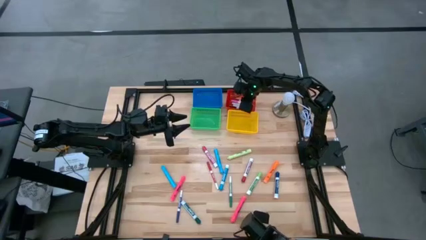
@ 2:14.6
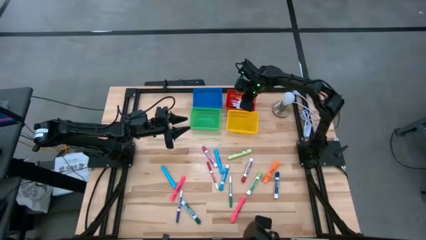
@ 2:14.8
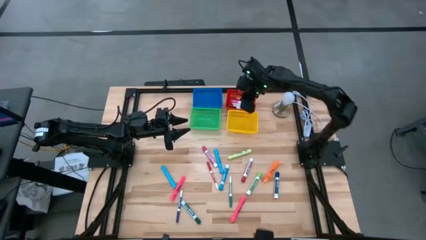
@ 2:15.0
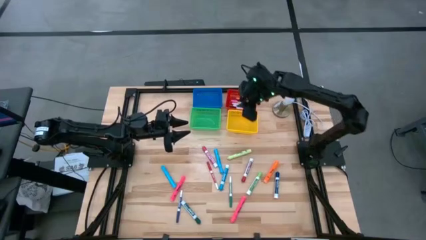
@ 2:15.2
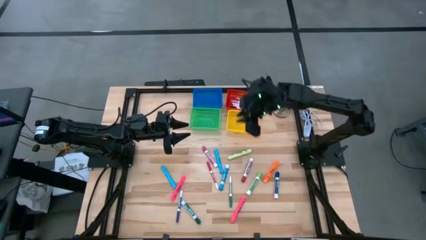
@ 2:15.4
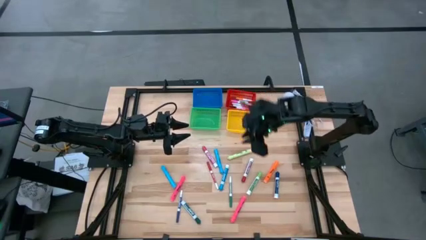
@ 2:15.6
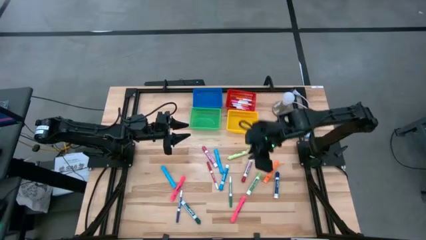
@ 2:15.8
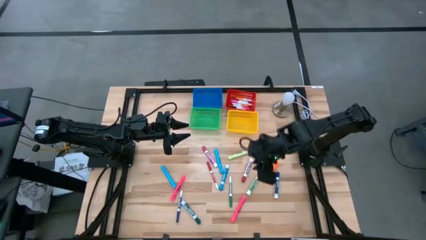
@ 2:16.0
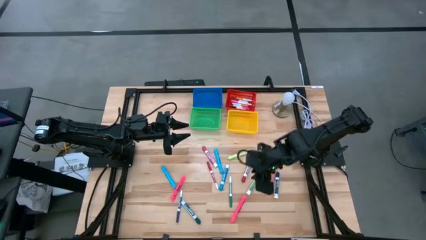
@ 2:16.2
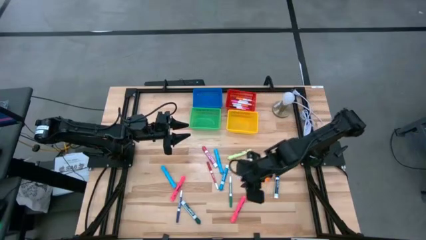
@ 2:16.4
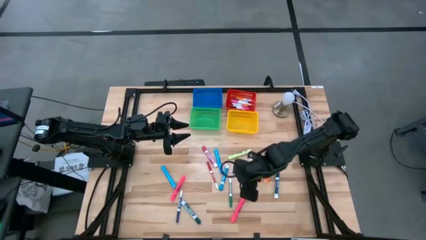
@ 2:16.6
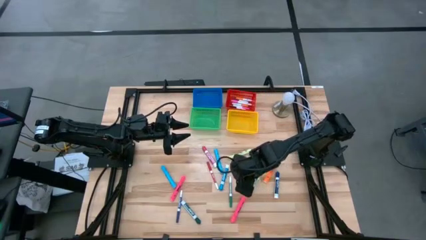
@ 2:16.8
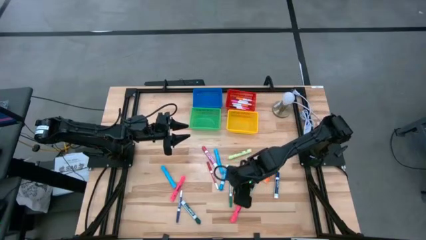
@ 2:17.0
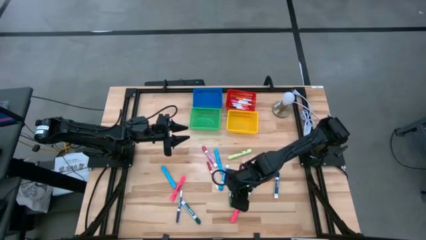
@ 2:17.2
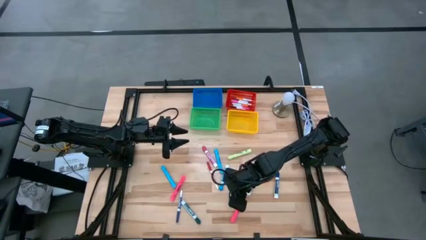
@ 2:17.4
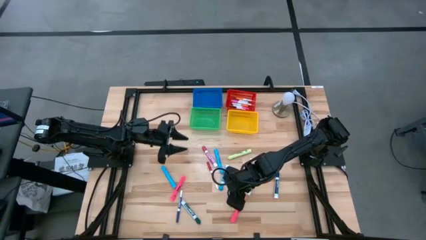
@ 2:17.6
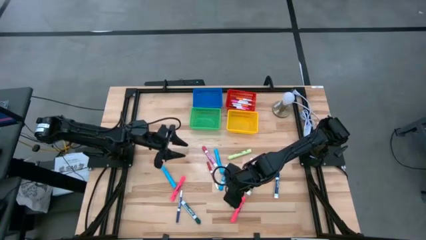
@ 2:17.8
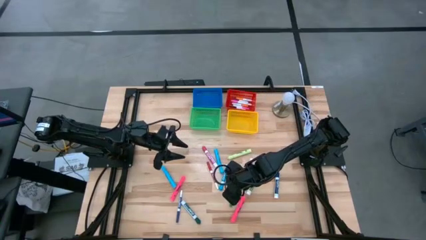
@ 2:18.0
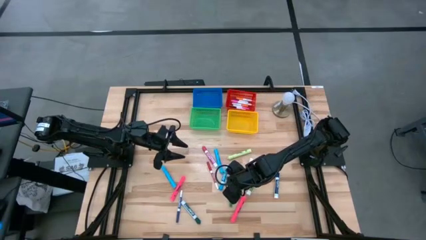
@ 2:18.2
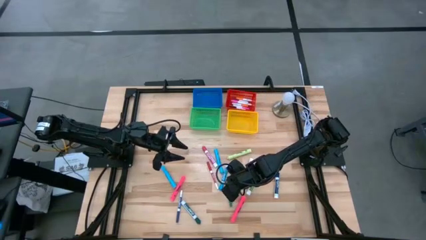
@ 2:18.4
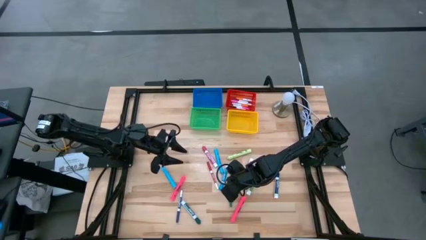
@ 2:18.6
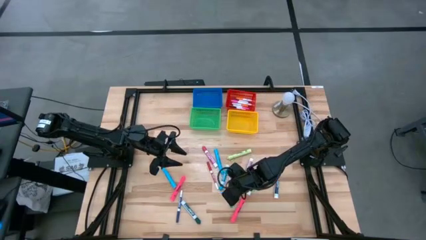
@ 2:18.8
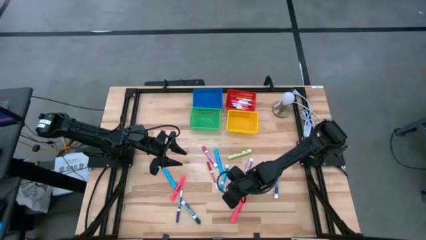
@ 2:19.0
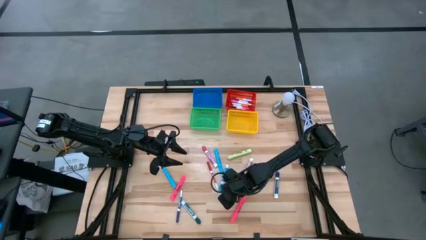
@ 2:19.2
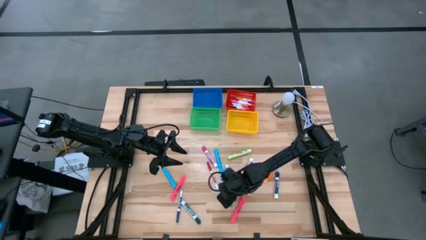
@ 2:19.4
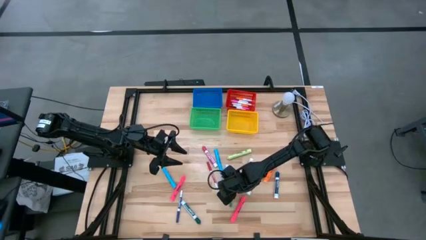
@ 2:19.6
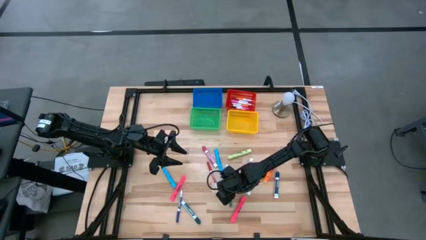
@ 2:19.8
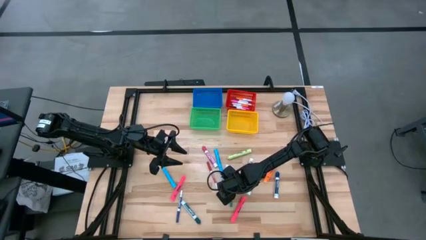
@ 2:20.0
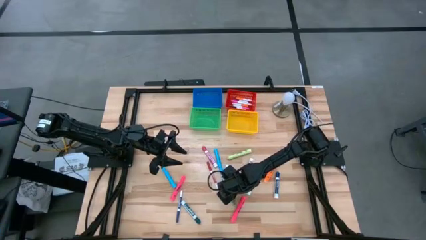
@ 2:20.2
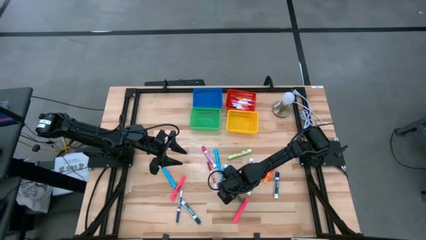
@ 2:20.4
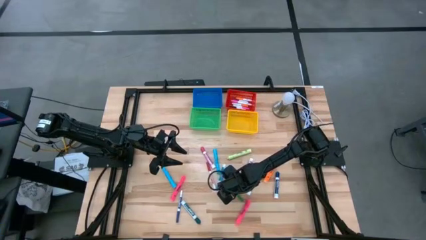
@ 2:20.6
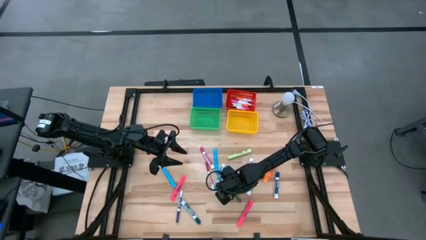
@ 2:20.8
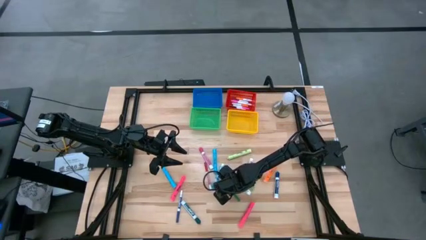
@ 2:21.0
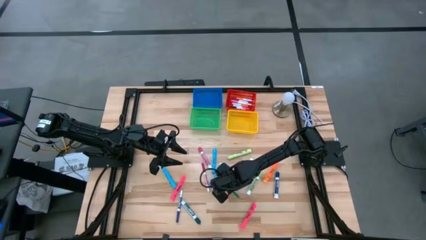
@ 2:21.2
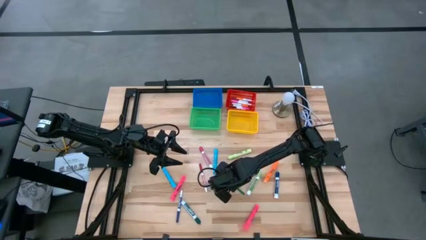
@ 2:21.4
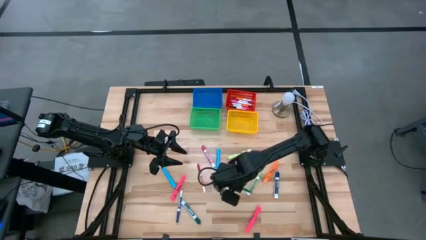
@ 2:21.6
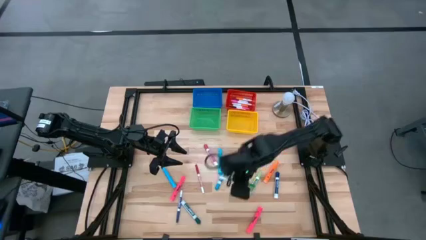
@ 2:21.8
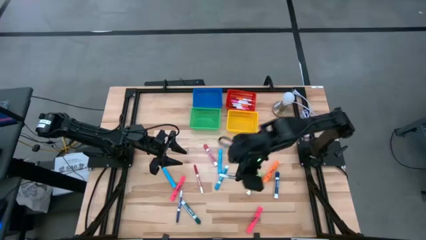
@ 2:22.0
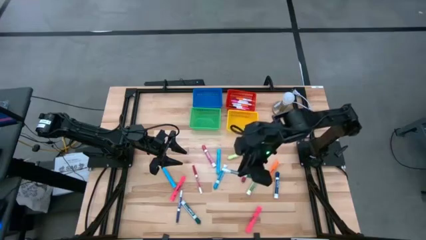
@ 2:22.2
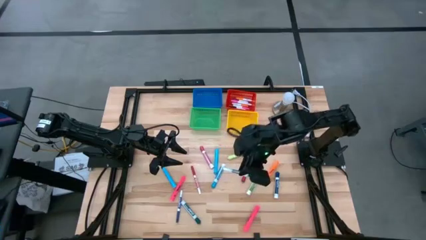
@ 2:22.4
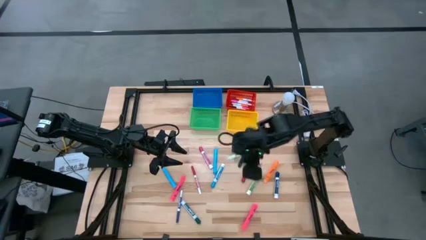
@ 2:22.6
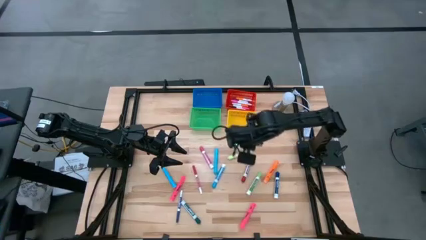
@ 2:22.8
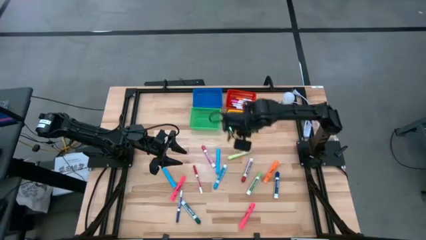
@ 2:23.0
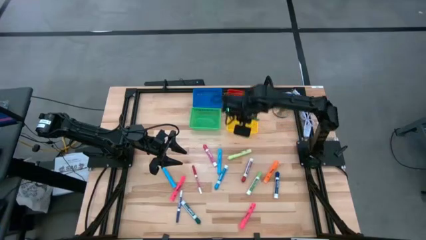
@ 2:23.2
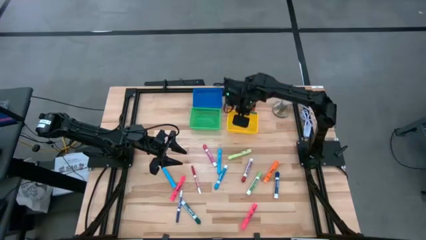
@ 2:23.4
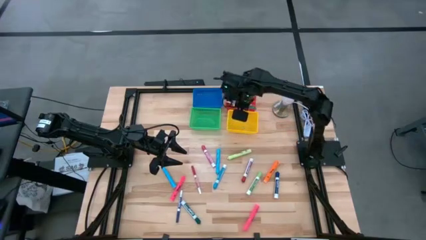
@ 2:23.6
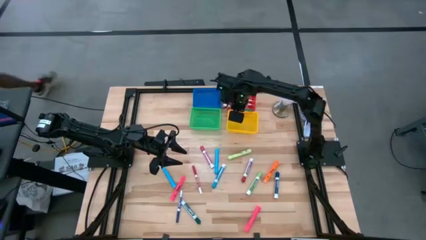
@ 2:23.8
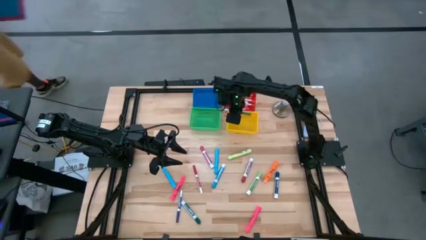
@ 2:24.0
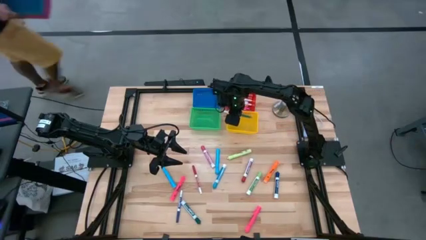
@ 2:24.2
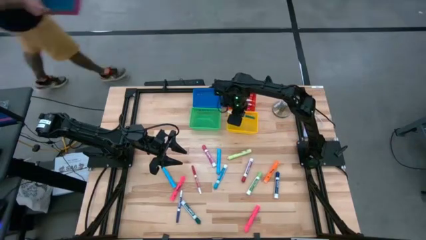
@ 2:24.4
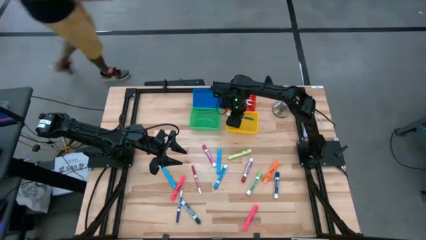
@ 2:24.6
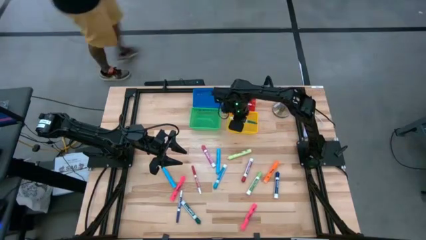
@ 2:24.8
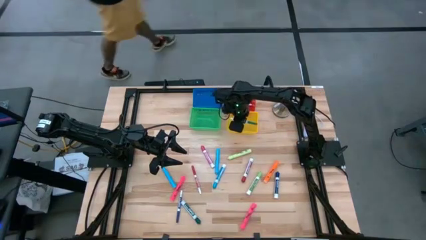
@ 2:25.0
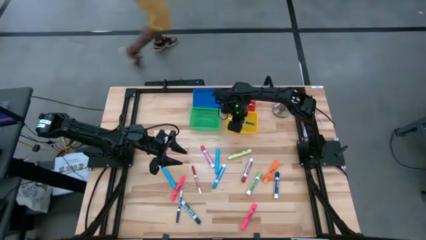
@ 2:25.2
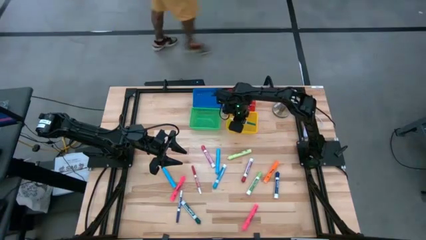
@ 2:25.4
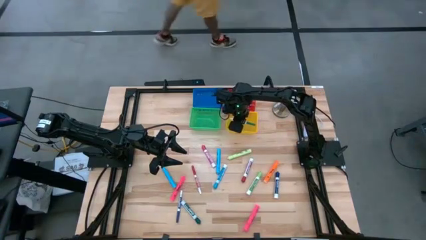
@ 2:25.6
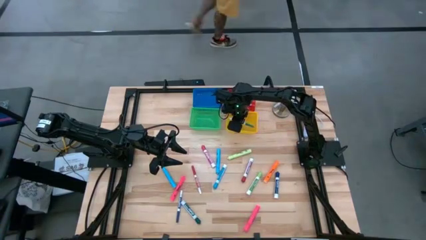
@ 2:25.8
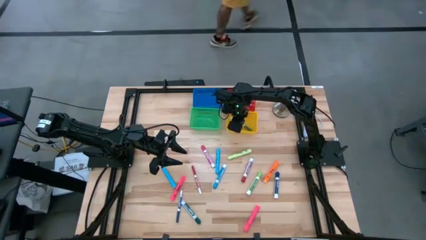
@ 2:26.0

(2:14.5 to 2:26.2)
Task: Pick & Place Markers
Put the small green marker into the yellow basket
